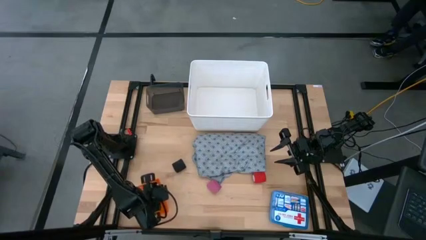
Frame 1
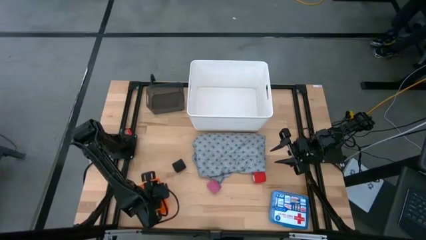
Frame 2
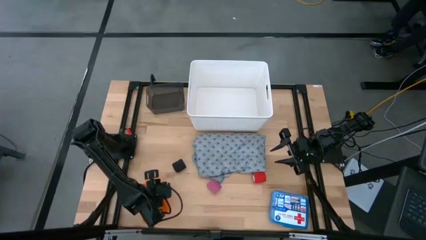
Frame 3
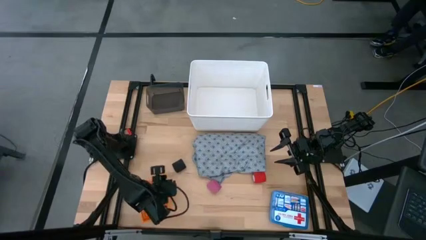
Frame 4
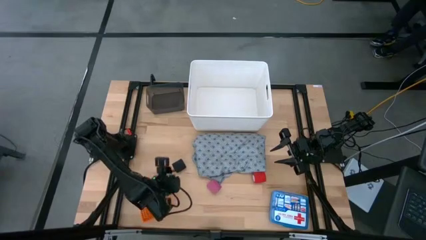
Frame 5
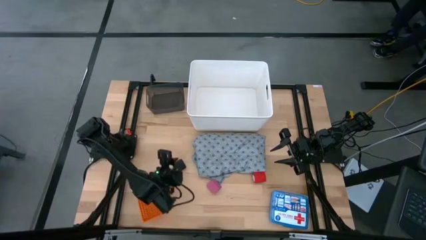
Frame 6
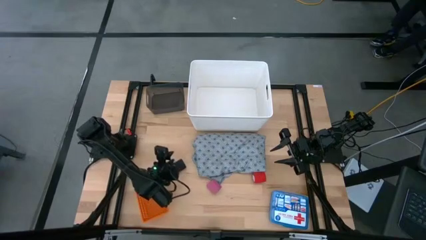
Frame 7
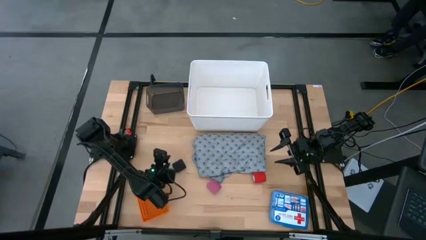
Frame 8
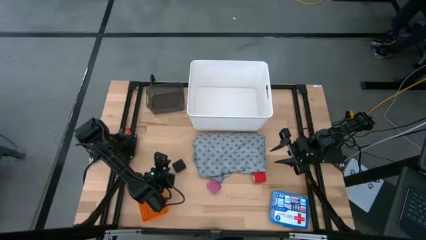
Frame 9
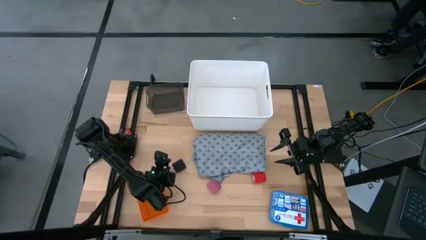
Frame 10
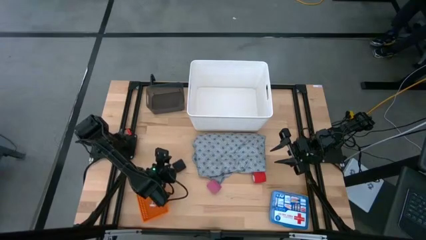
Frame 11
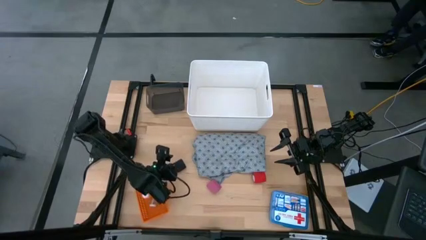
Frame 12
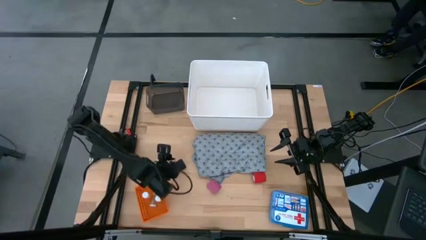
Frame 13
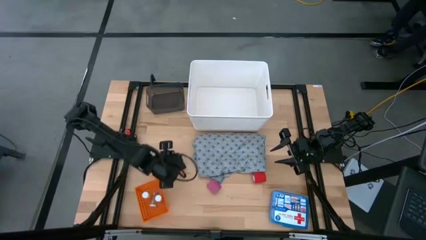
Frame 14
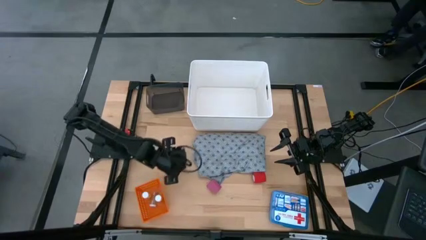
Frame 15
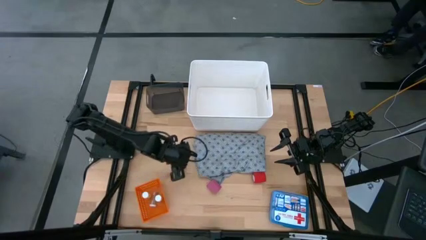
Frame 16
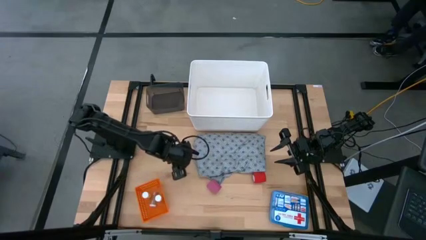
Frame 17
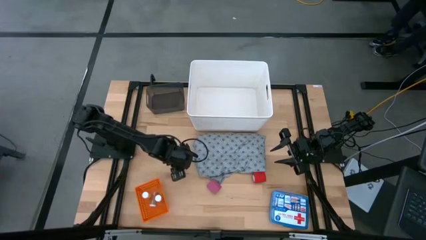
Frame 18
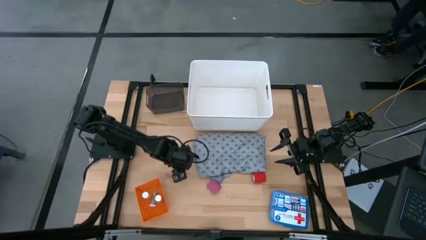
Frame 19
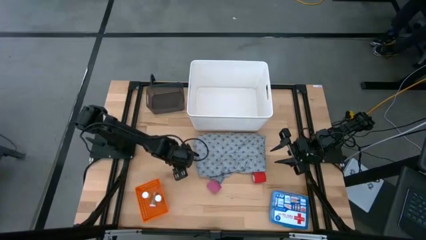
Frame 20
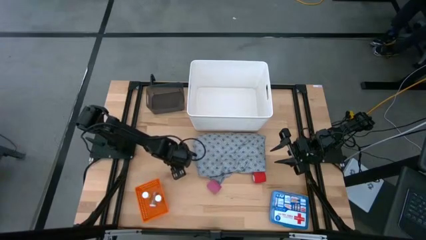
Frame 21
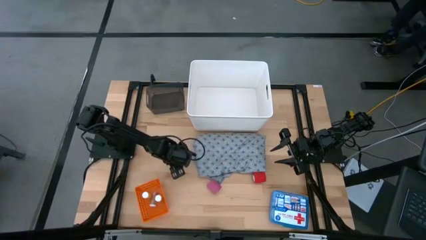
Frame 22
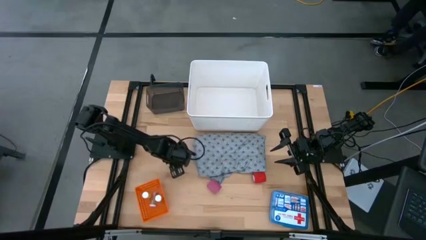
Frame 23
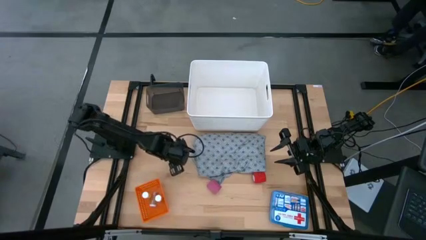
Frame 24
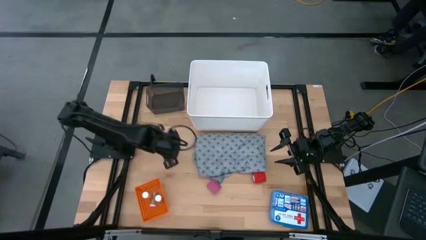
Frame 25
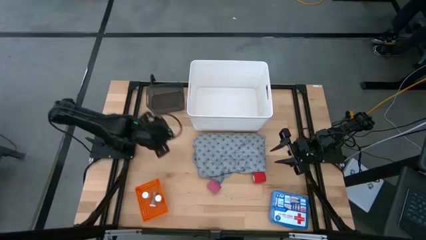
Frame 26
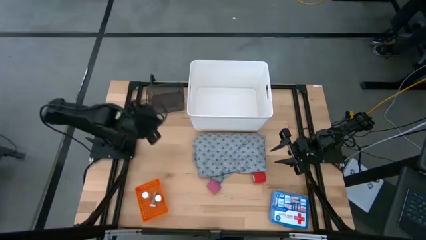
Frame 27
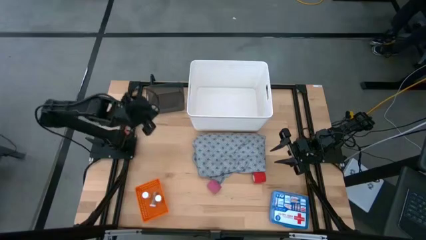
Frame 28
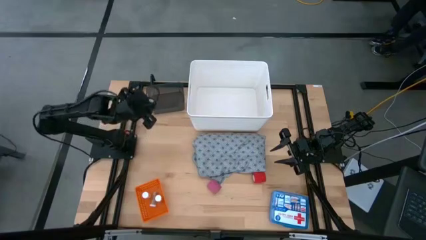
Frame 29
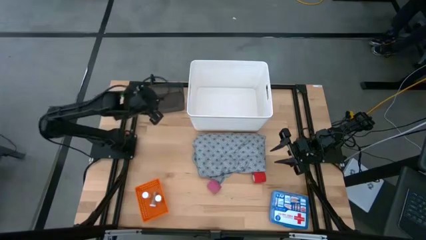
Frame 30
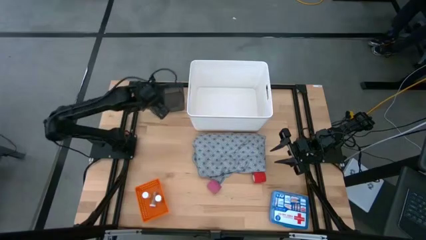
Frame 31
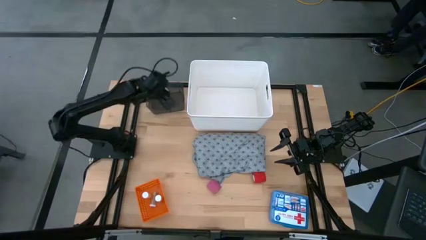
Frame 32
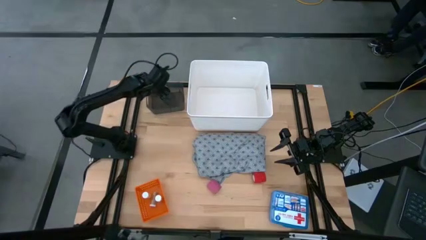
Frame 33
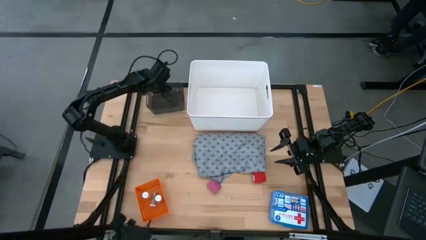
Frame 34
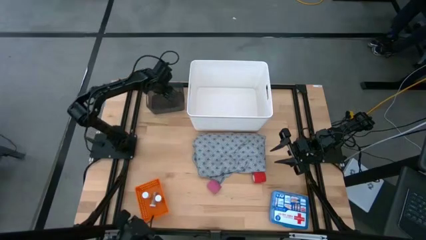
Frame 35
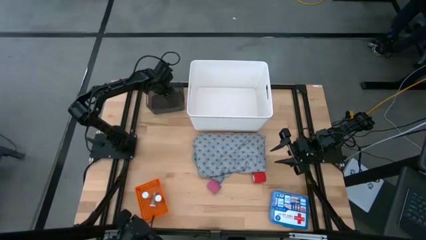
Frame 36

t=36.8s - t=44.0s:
Task: Pick & Place Medicine items
Put the black bandage into the black bin

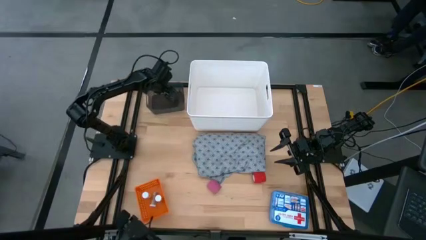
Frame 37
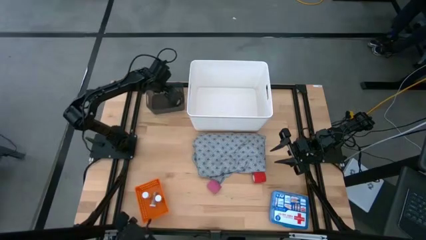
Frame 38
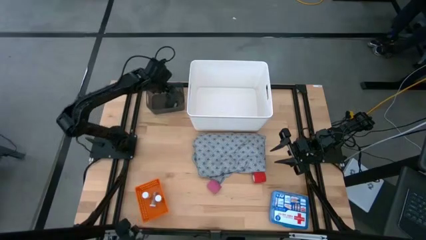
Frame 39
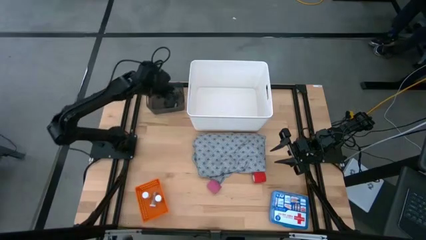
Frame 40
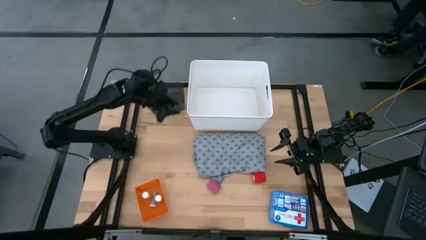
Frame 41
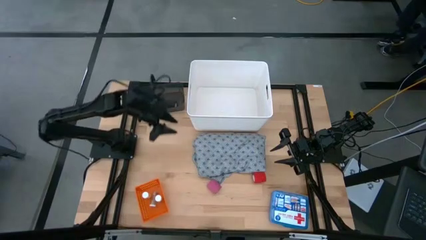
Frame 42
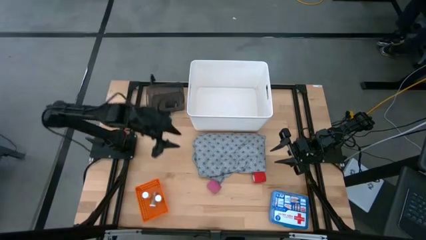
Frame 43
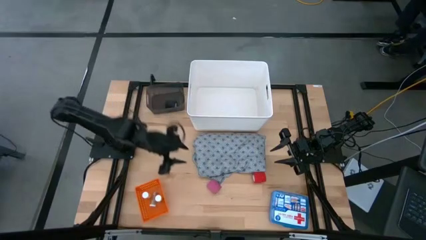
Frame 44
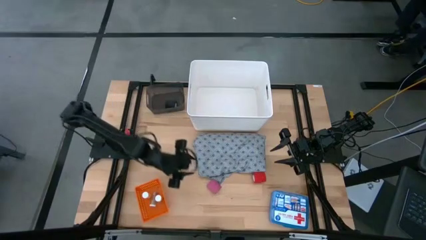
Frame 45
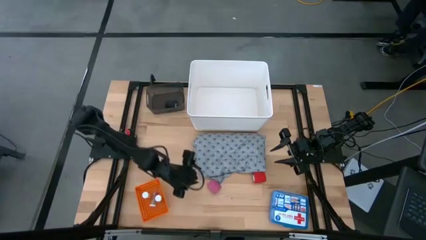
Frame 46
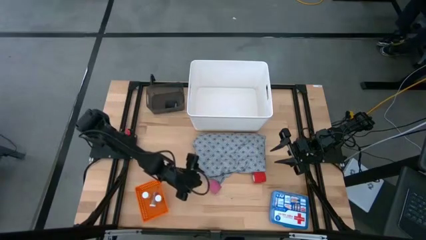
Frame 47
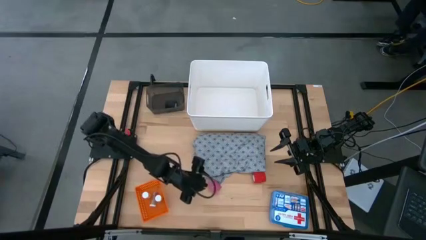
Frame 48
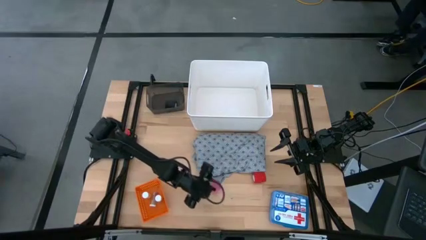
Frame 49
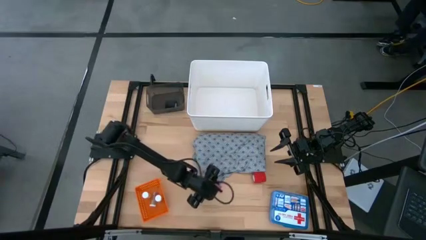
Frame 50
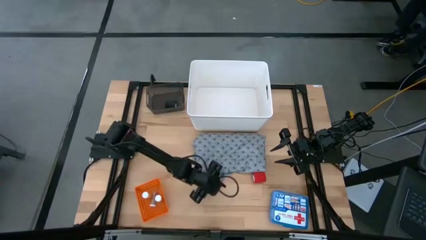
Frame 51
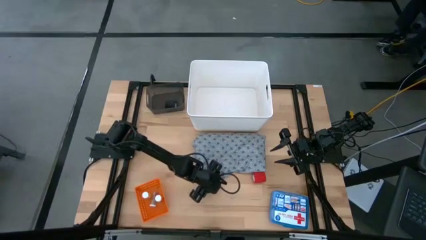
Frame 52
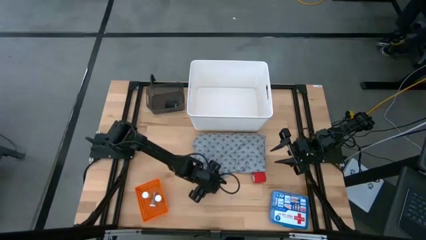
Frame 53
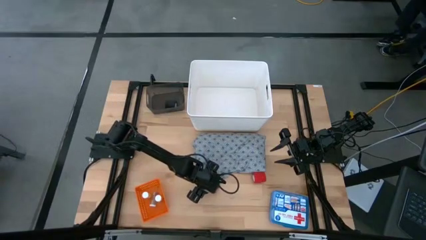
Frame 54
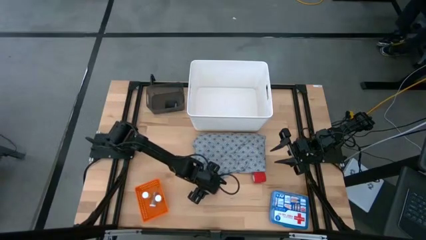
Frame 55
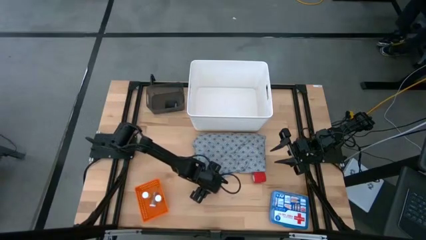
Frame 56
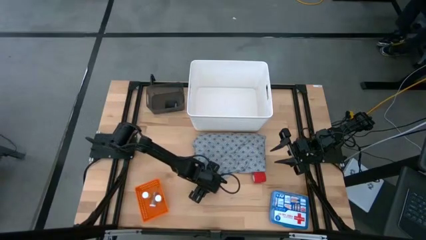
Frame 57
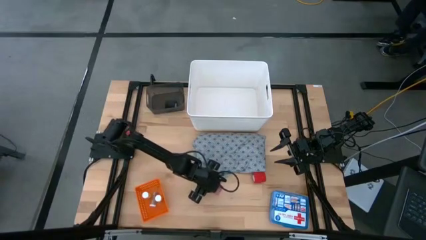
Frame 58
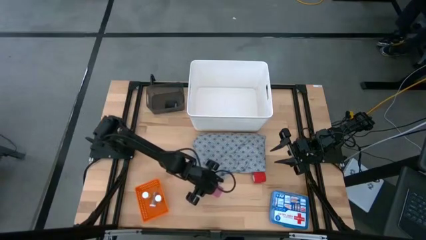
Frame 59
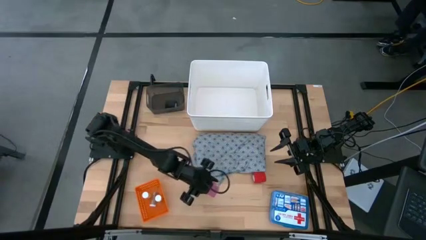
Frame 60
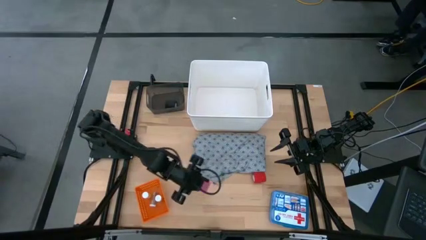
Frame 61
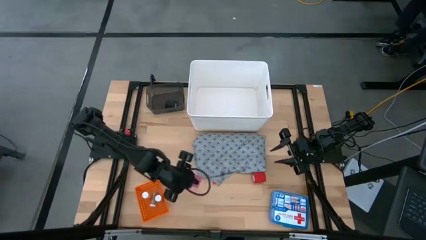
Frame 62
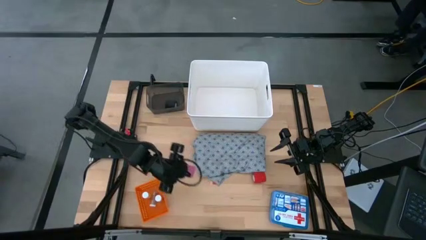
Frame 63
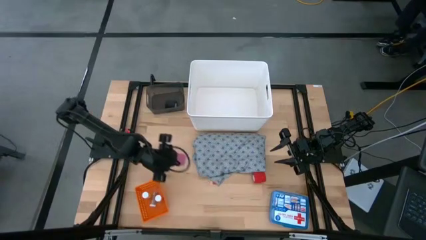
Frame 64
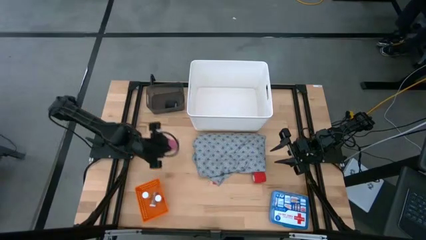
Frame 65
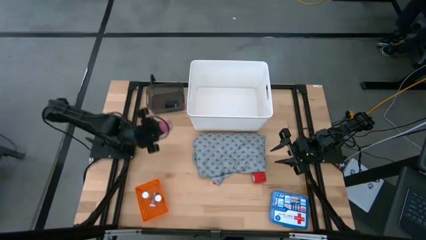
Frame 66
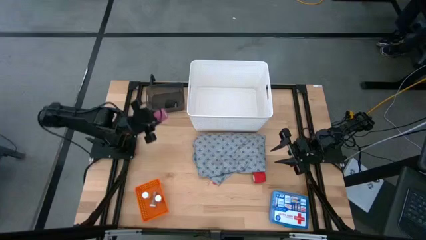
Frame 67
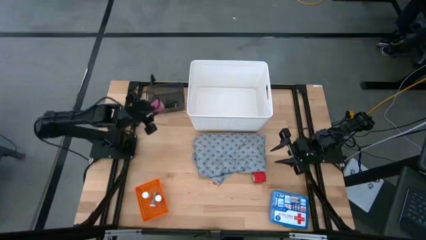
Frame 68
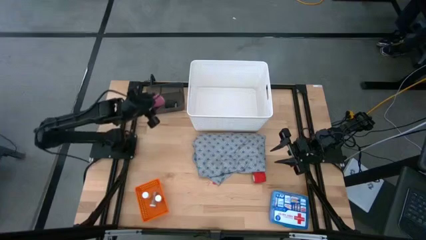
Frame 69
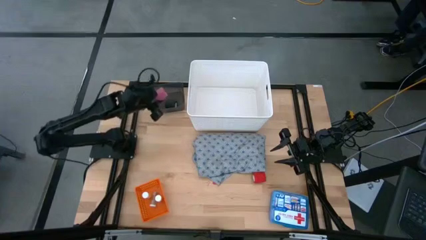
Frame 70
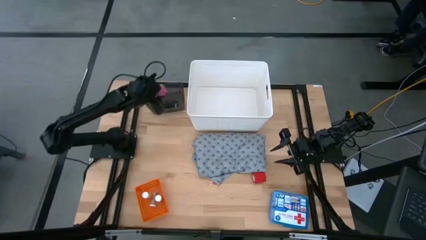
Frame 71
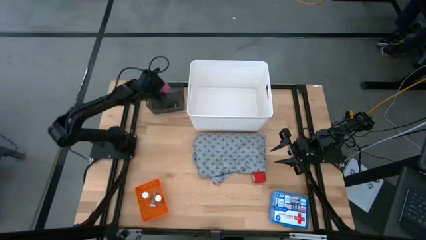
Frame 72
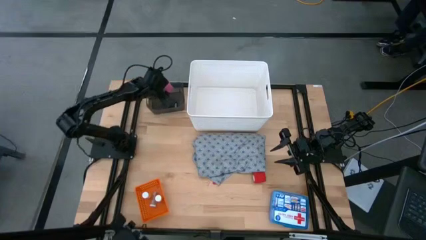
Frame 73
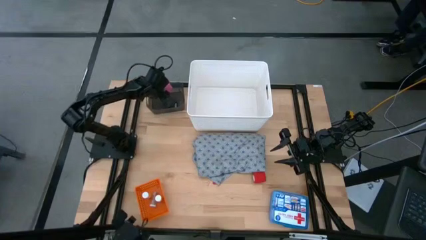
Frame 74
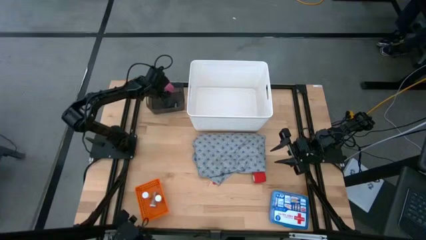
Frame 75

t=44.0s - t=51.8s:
Put the pink bandage into the black bin

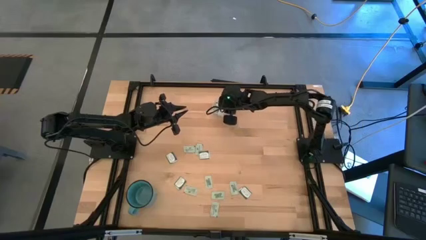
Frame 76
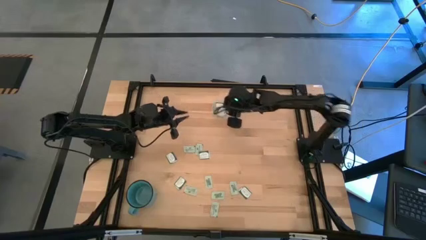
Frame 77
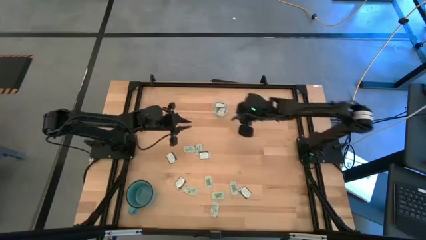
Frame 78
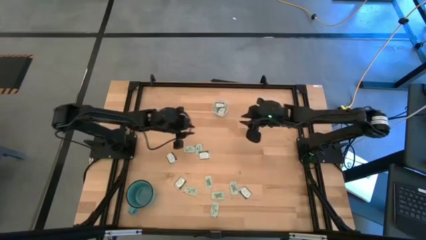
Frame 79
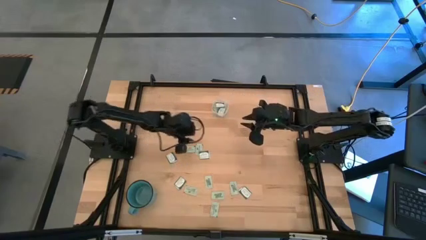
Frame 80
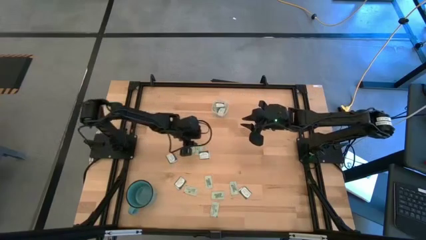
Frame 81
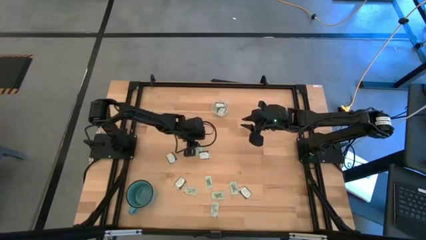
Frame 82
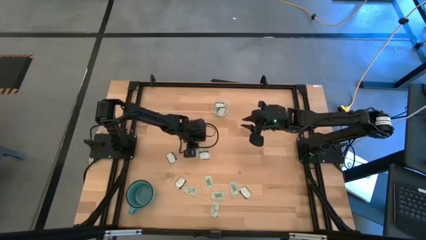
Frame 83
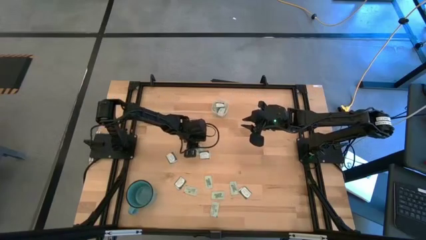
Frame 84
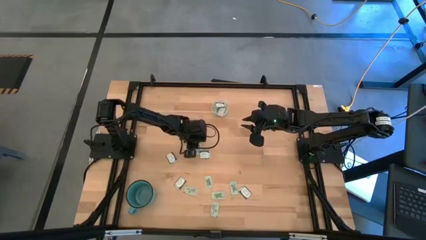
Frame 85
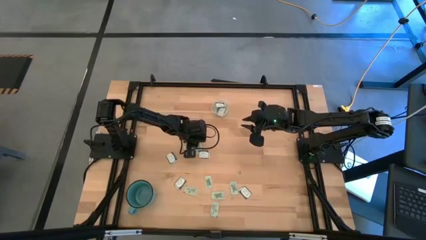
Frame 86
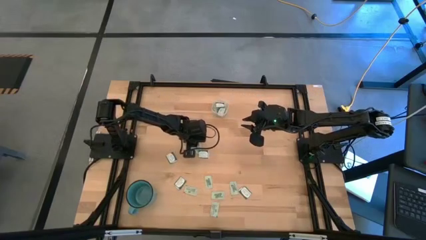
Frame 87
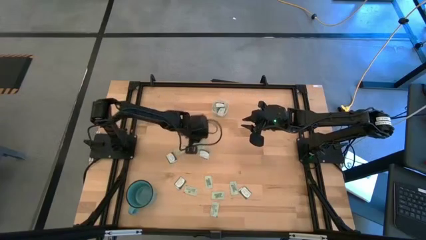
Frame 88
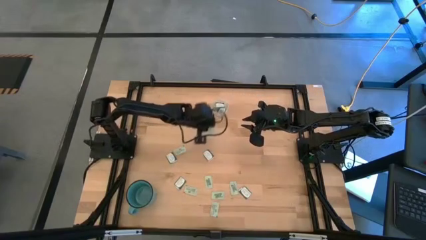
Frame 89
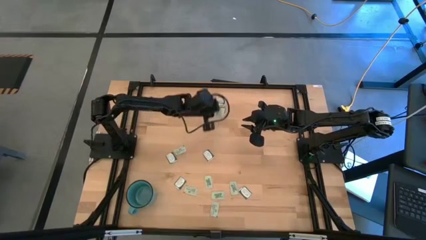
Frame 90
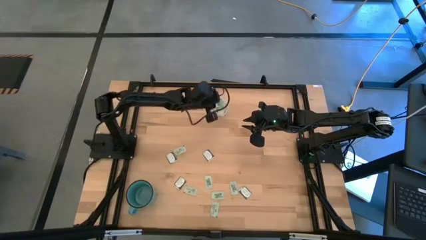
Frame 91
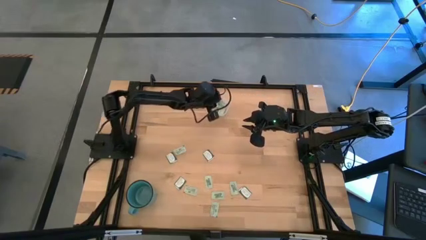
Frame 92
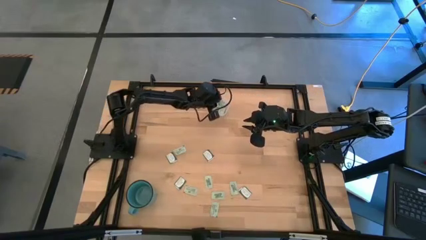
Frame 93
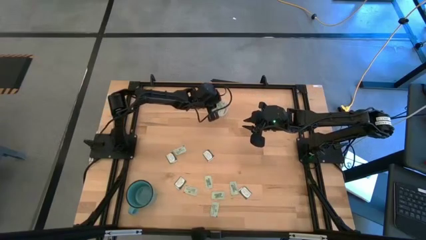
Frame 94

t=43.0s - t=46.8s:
Task: Pick and place items into bin
Put the light green stevia packet into the transparent bin
